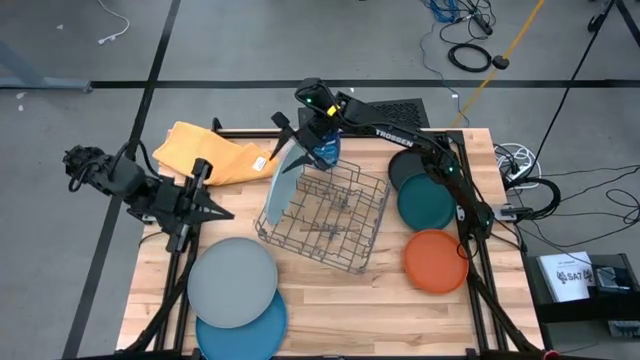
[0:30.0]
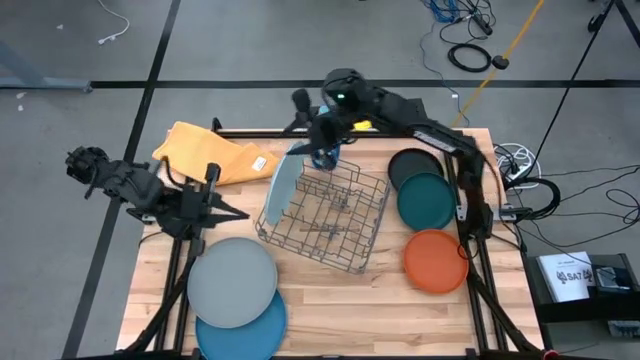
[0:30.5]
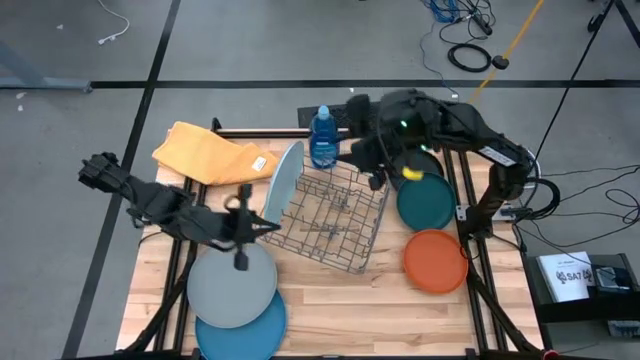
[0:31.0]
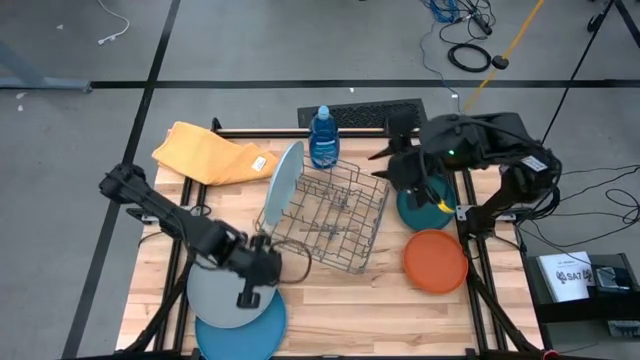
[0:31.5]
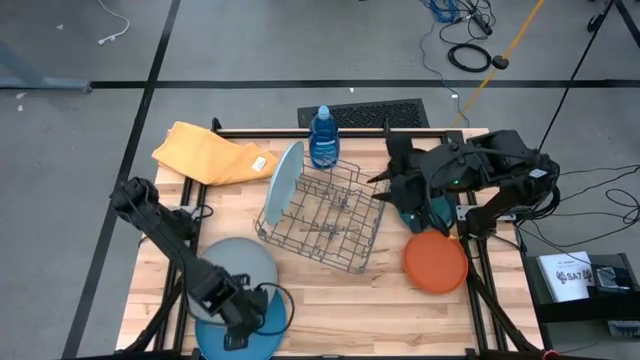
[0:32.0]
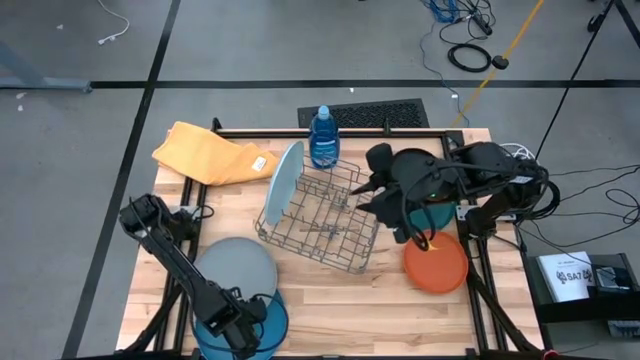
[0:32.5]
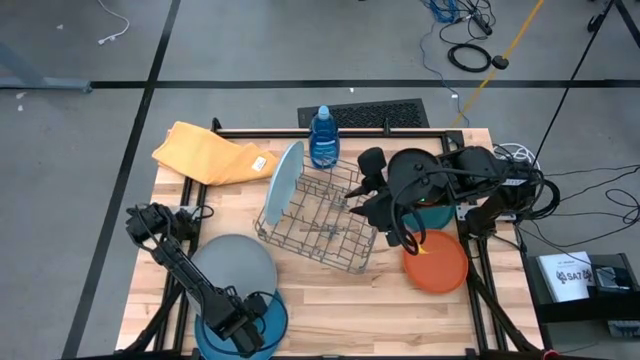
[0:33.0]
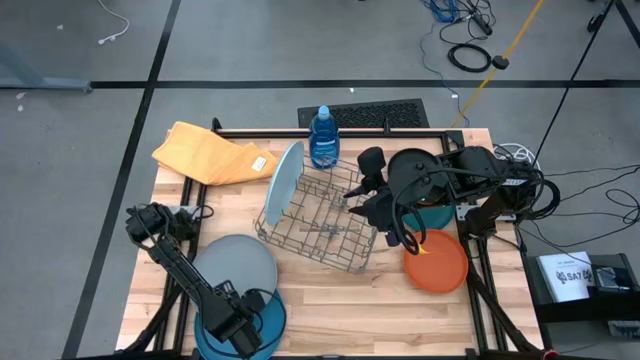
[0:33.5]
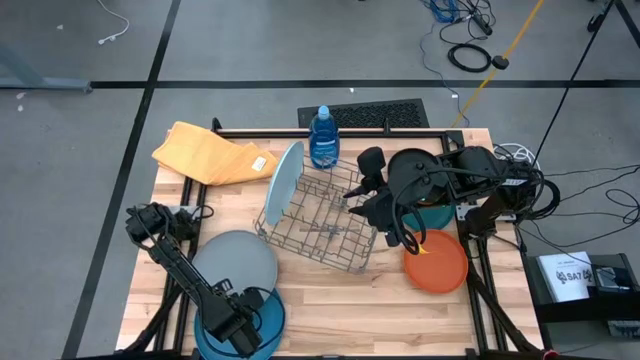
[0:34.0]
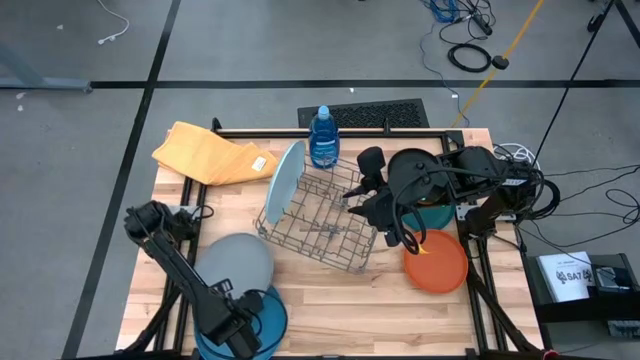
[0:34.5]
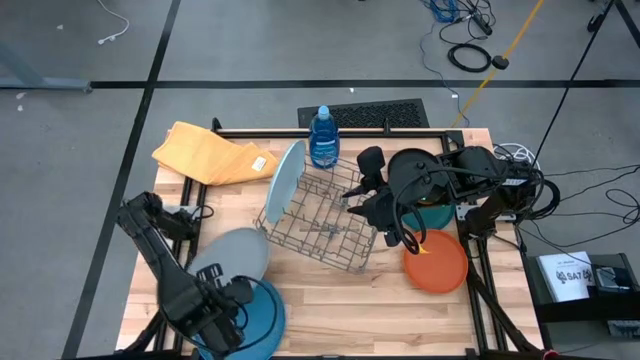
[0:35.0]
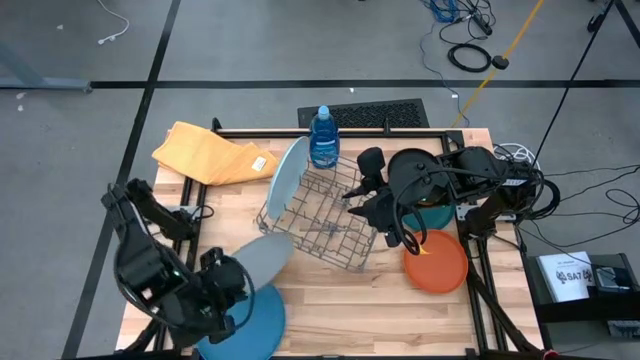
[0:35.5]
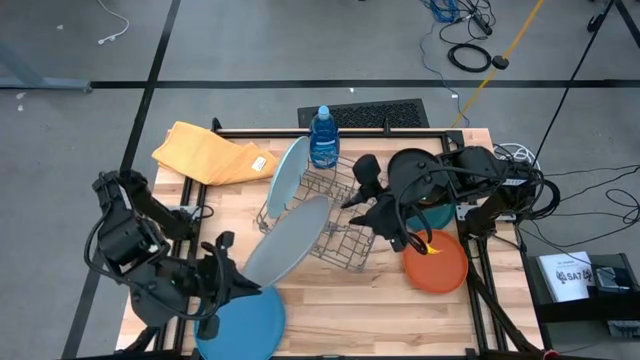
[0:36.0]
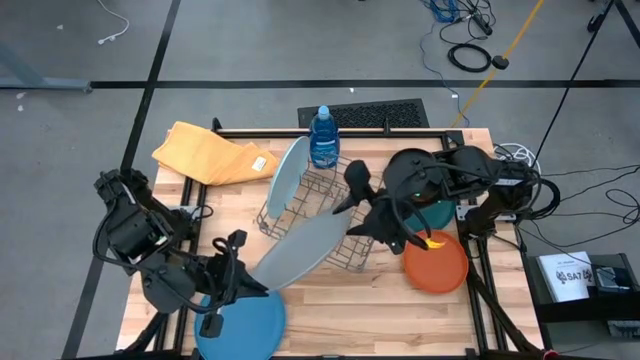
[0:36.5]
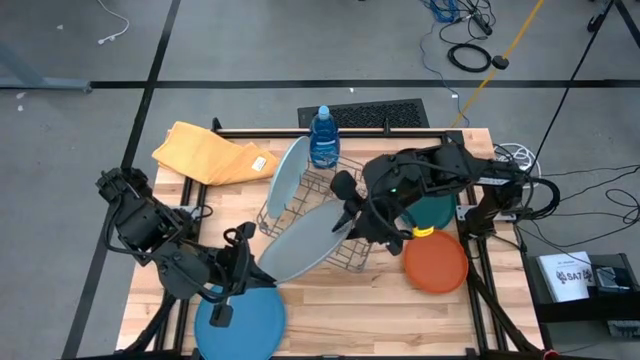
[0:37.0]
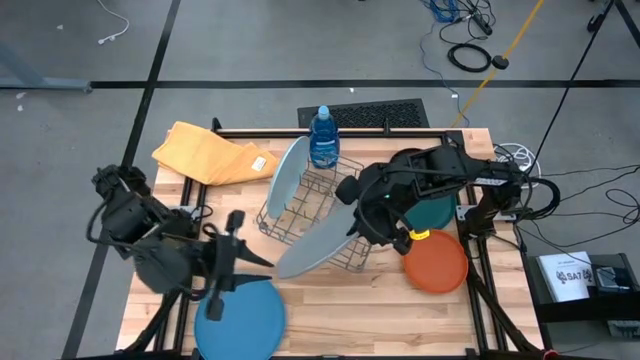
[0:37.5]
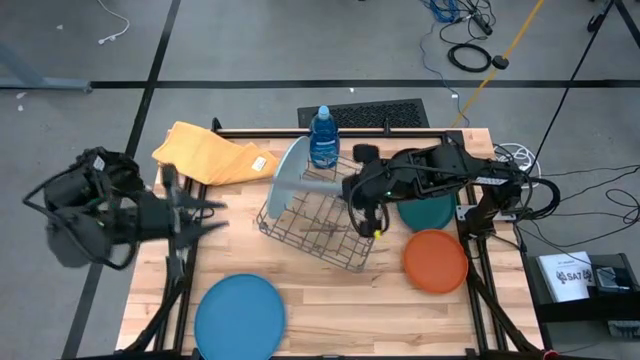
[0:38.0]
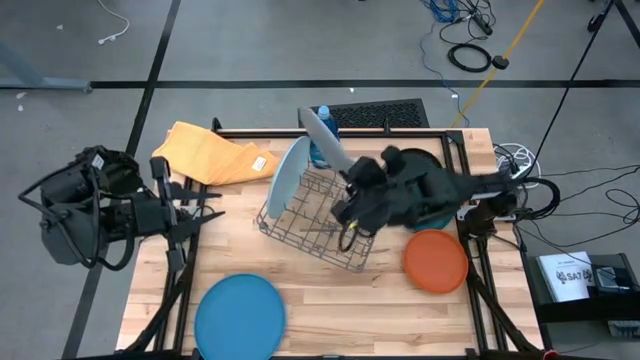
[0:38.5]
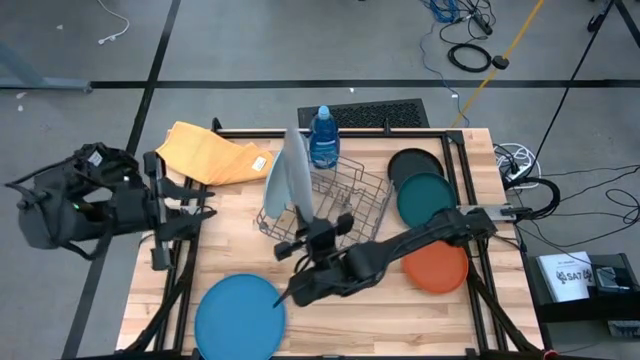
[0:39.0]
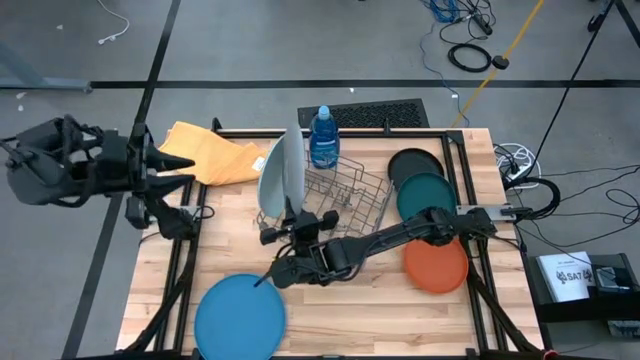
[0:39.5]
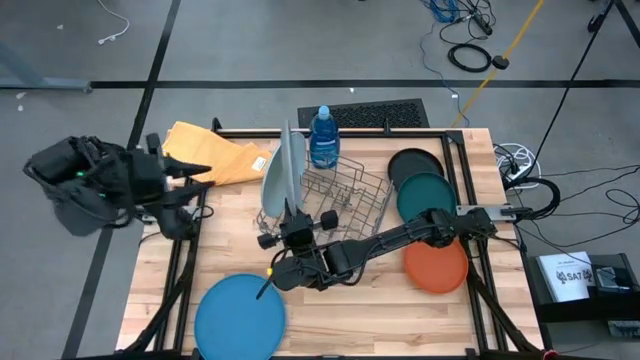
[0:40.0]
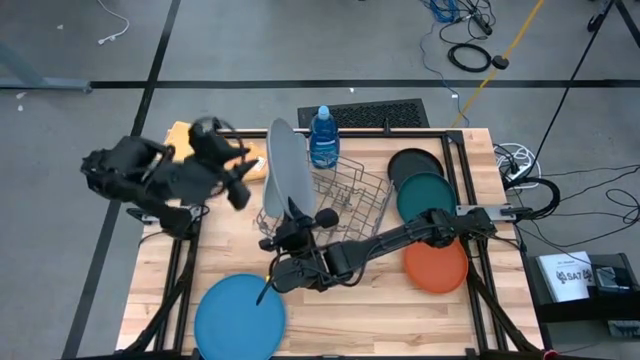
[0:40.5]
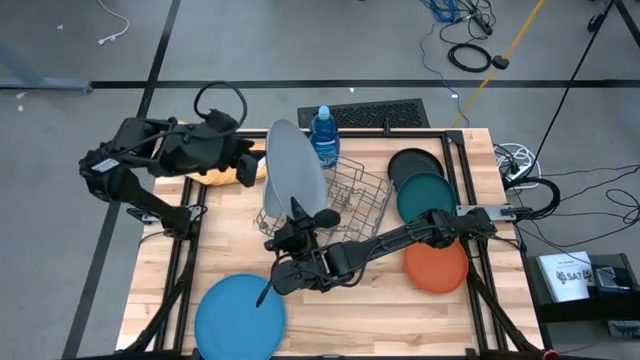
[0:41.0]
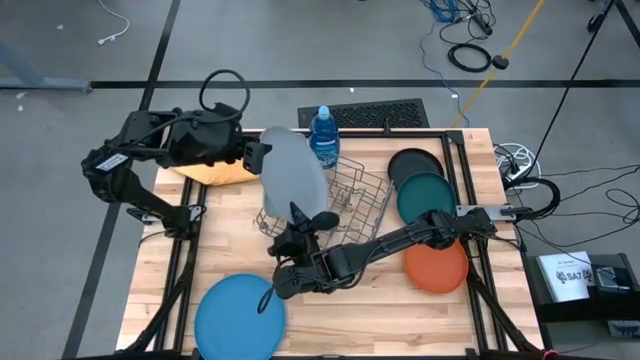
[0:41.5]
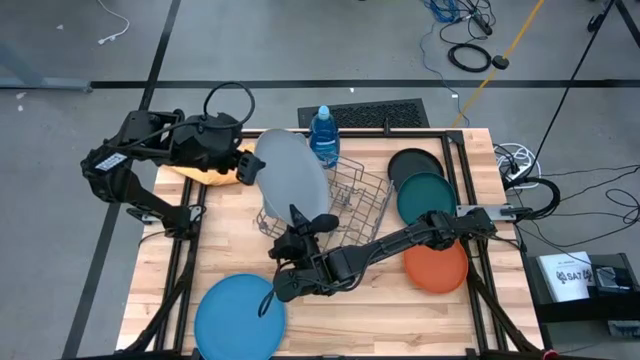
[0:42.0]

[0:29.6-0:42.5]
Task: Sort dishes
Put the gray plate into the dish rack

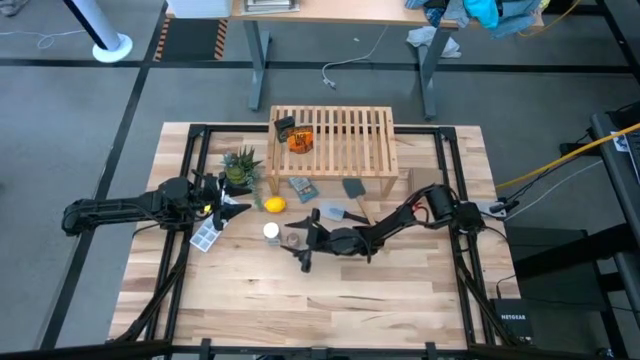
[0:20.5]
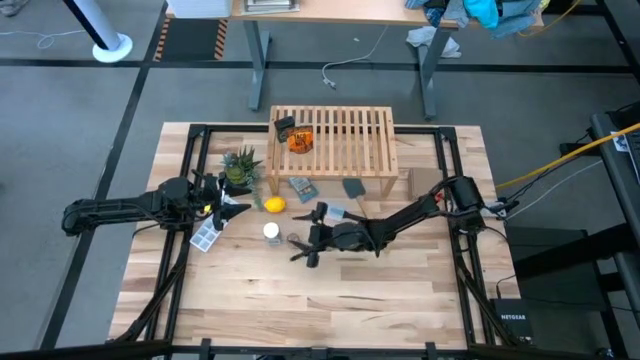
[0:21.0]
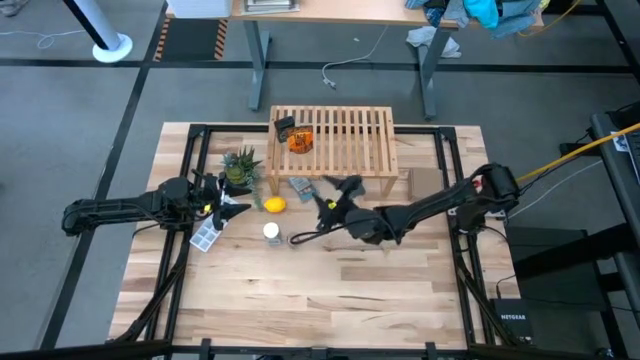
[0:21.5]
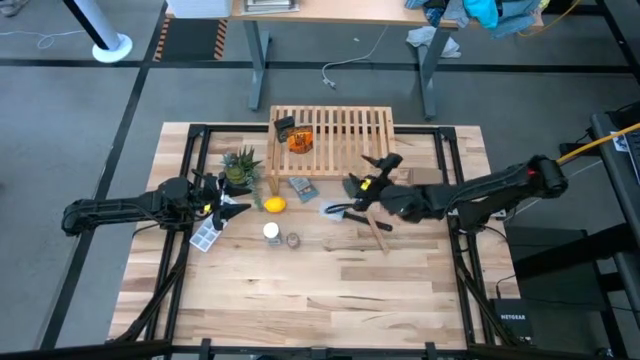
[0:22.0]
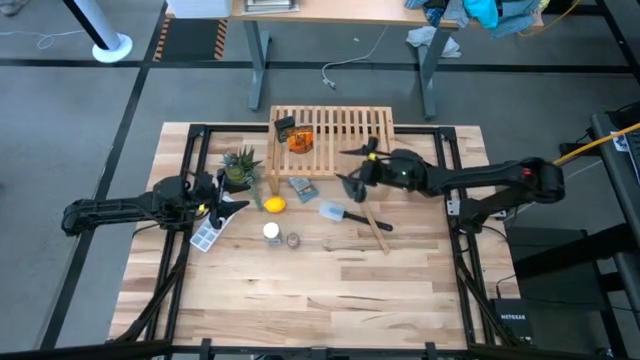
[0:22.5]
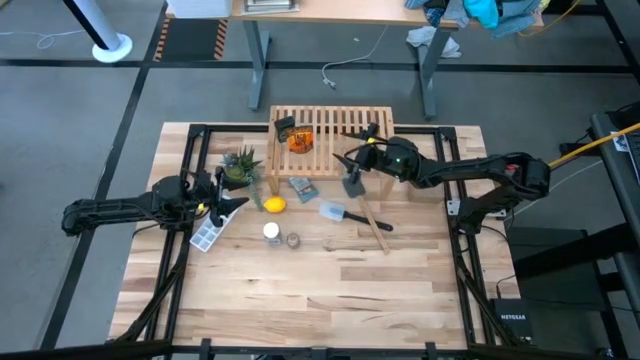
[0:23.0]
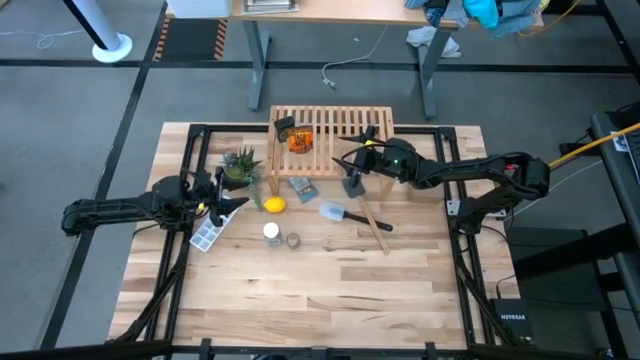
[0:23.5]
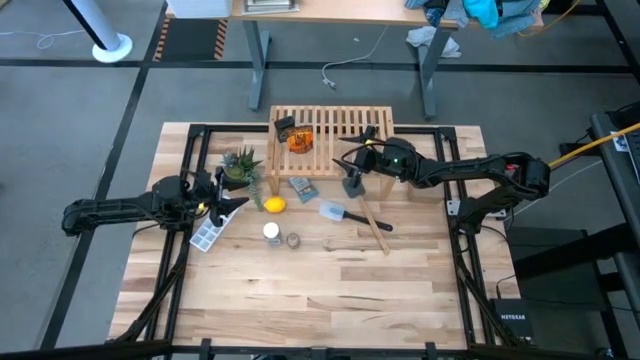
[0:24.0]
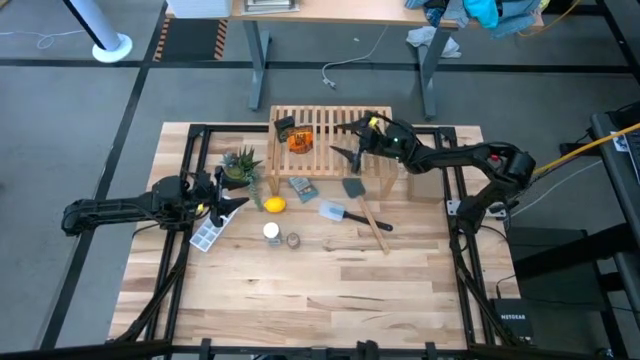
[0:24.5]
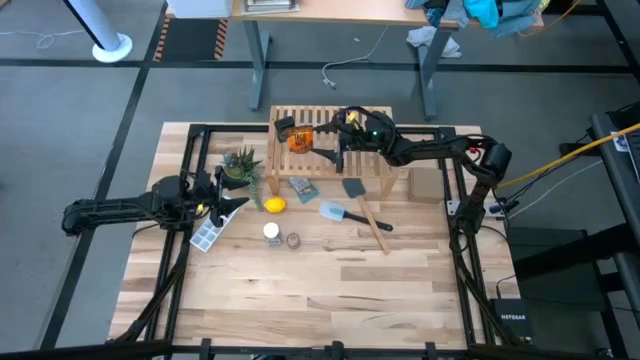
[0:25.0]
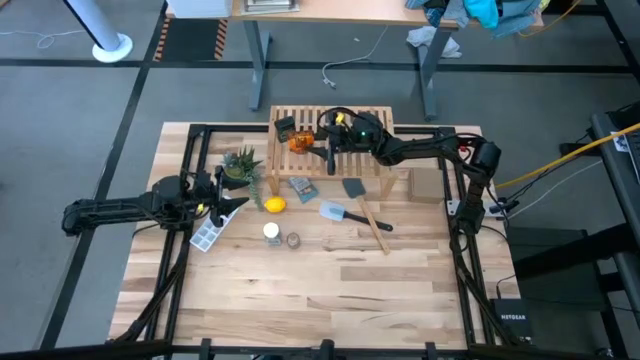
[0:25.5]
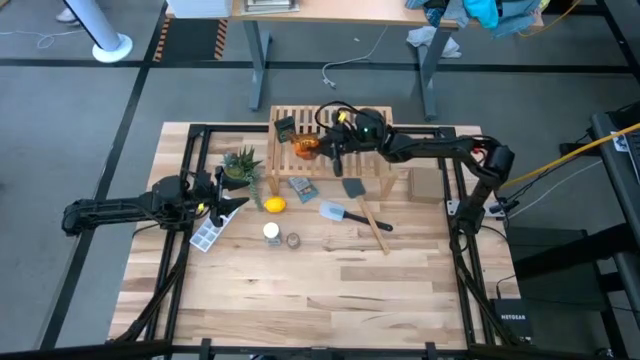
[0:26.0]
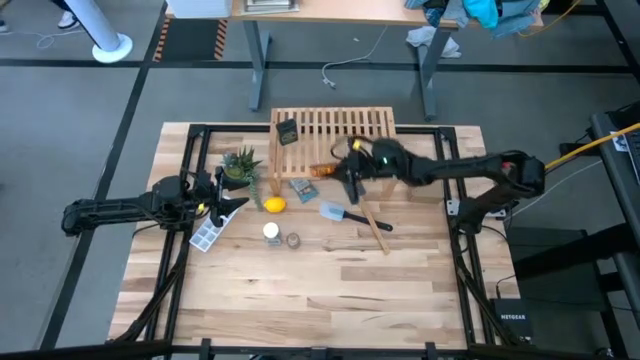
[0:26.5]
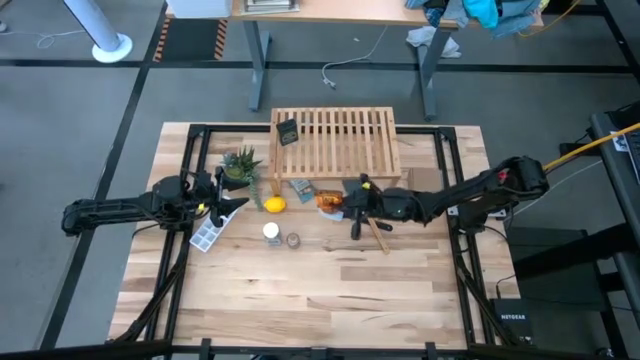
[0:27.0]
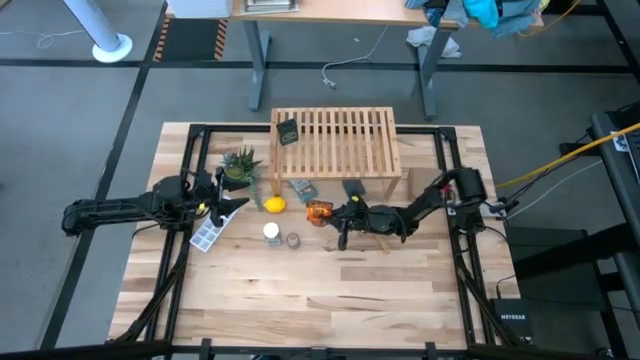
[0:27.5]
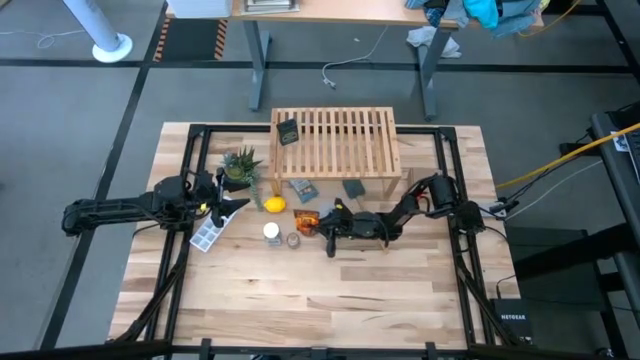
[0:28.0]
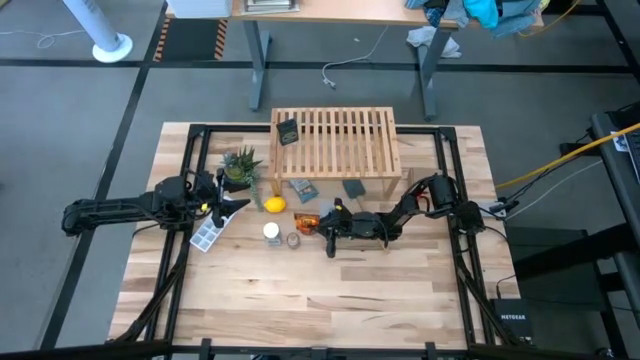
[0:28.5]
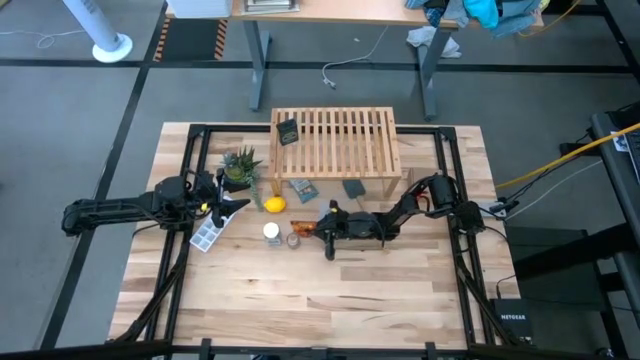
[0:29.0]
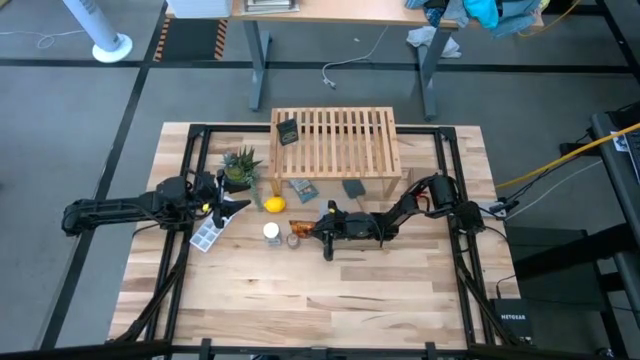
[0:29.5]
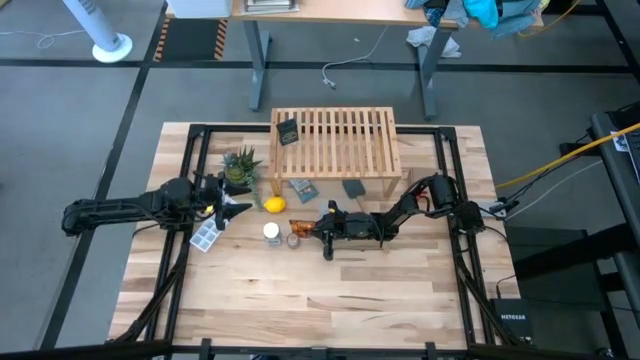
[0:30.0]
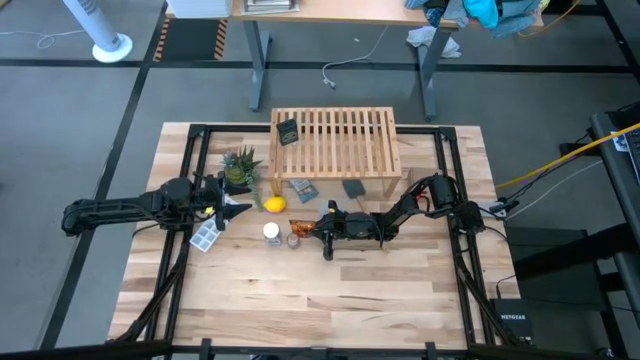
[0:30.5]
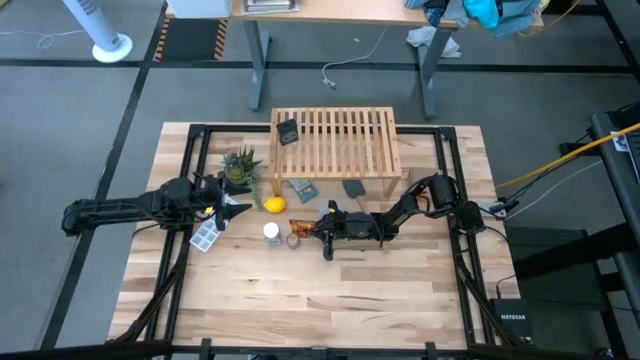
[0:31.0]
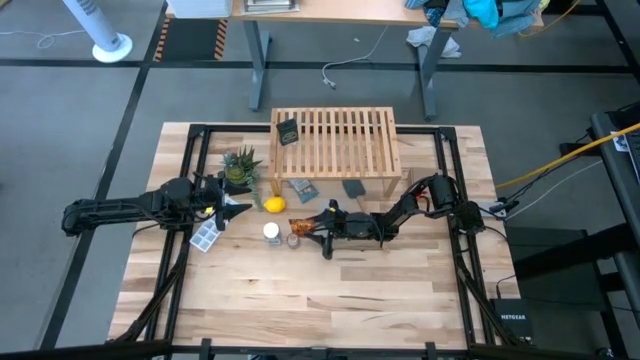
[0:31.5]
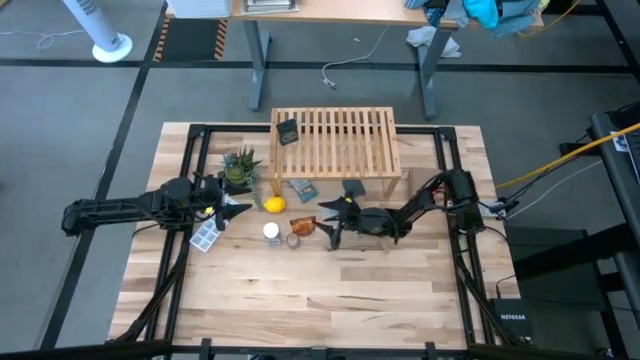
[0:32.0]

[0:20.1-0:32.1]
Task: Shelf spices
Remove the orange seasoning bag from the shelf
